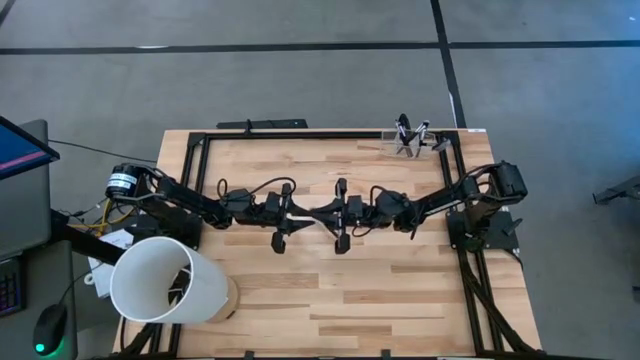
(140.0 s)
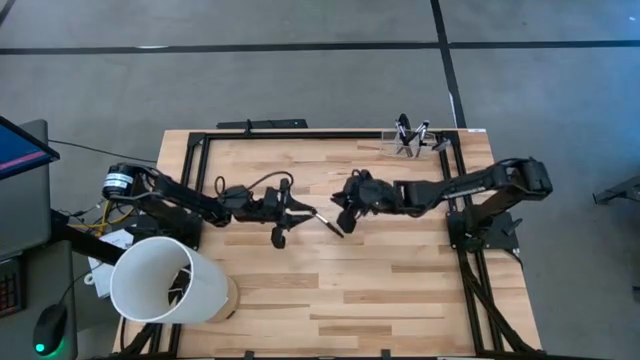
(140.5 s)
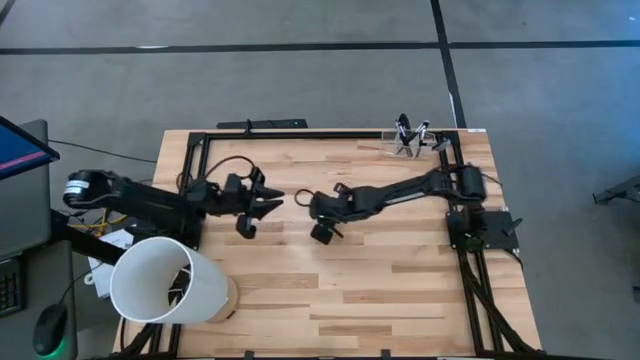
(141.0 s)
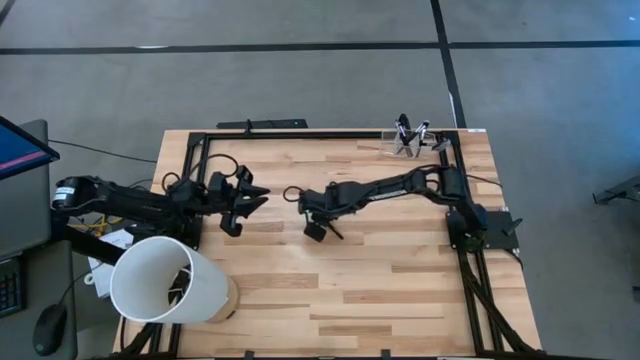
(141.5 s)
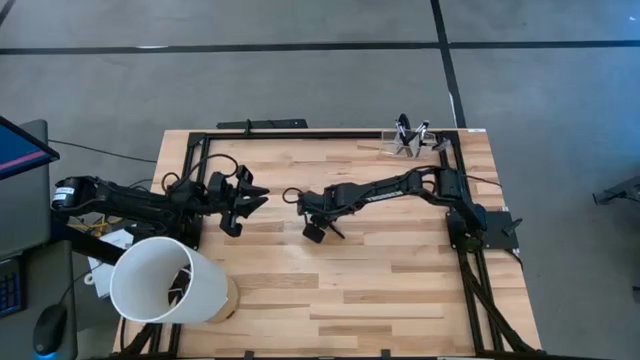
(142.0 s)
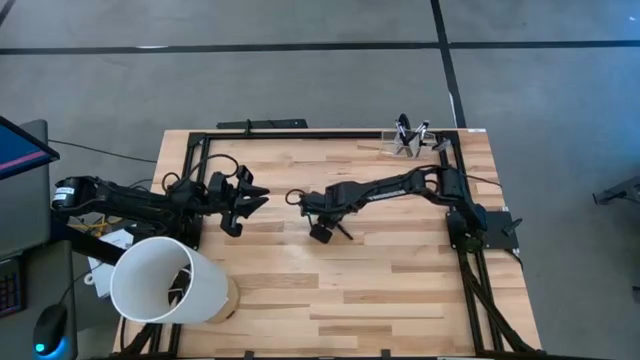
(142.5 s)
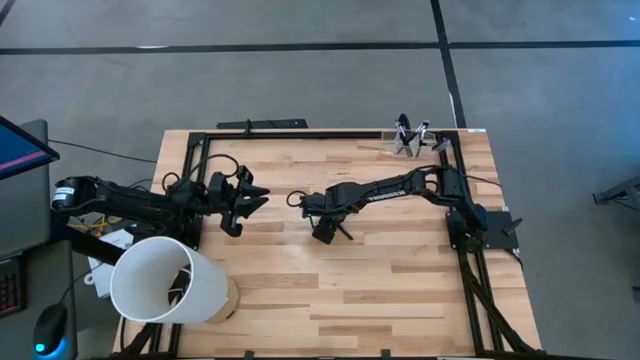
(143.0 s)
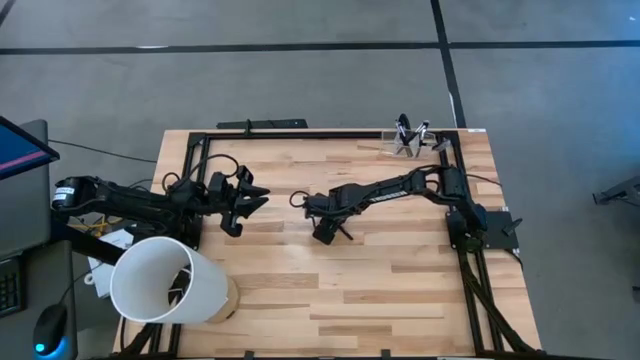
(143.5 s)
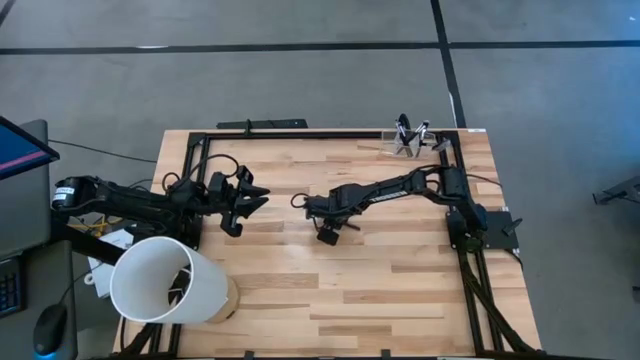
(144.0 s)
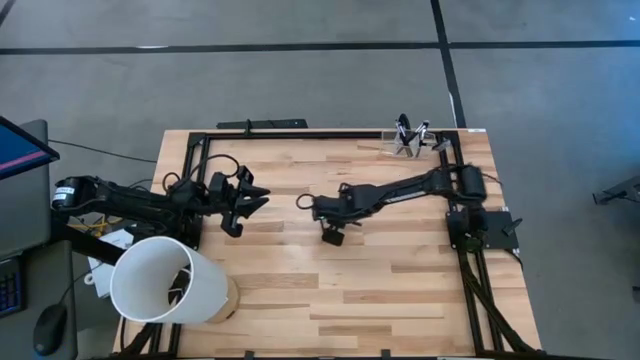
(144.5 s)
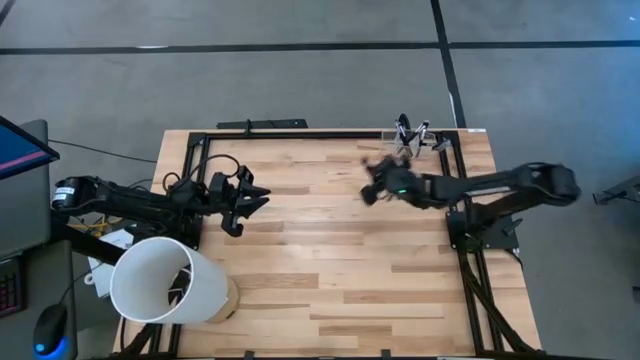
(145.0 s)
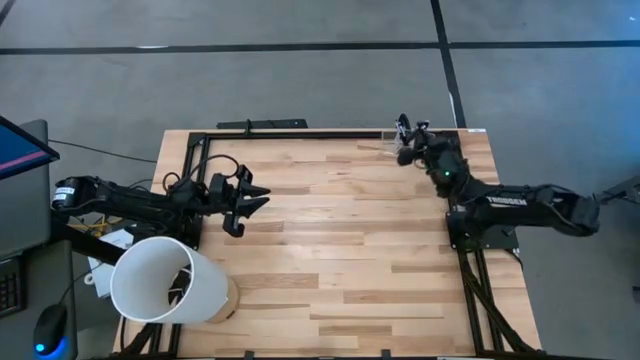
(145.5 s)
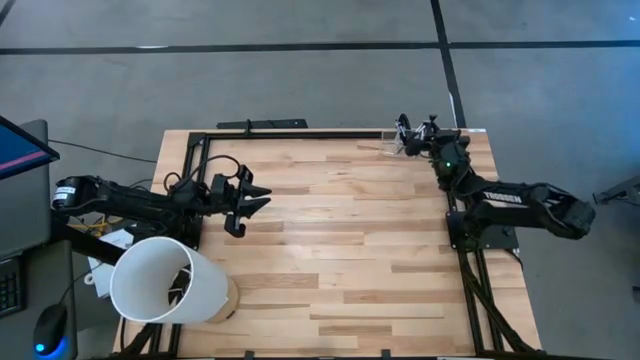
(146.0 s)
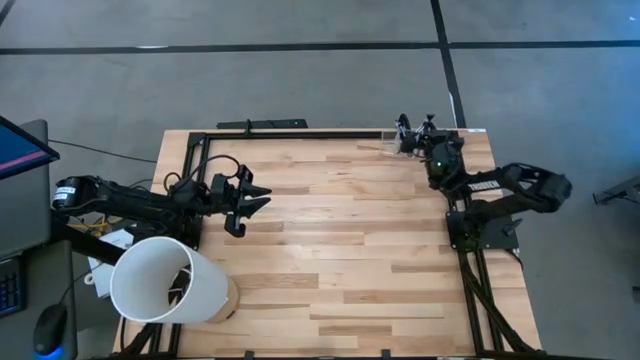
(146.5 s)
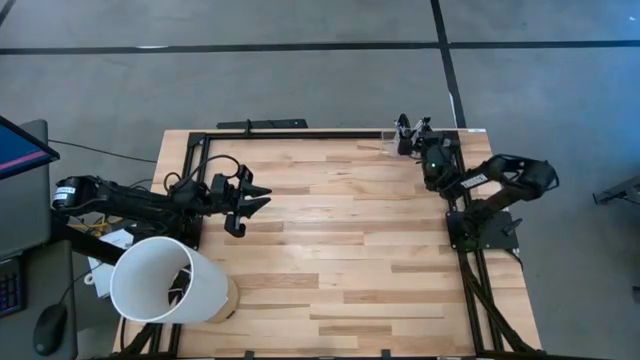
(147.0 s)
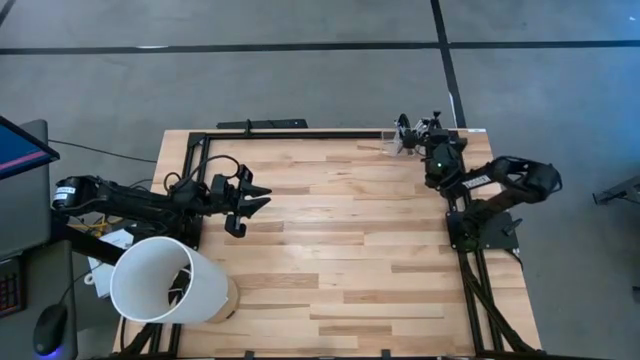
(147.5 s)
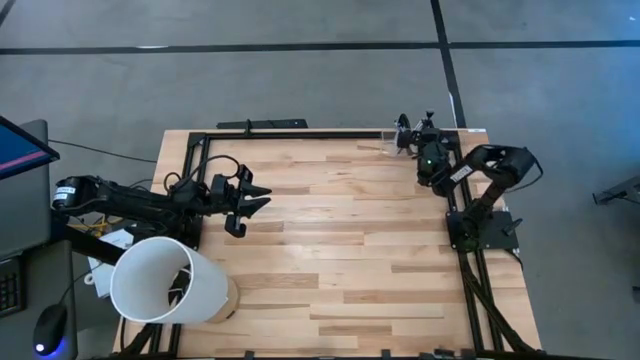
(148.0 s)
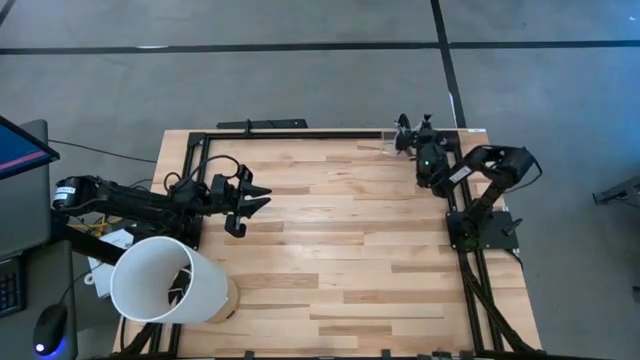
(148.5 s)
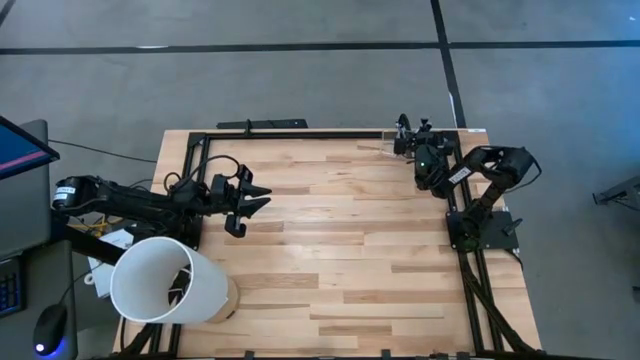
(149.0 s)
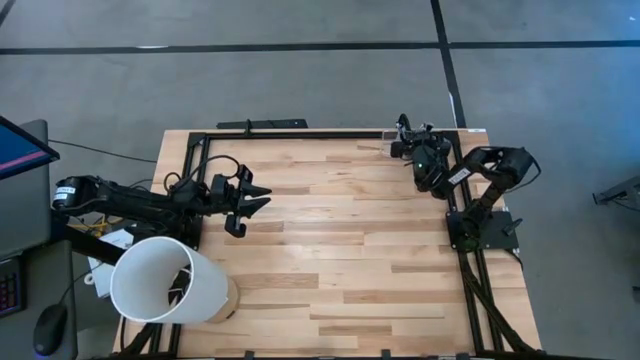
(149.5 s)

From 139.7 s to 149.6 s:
Task: Put items in baskets/containers
Put the powder brush into the right section of the transparent organizer

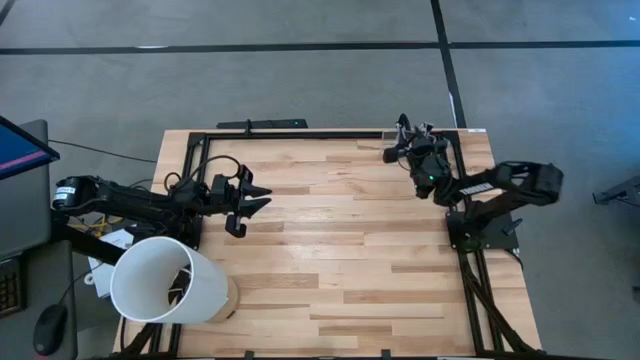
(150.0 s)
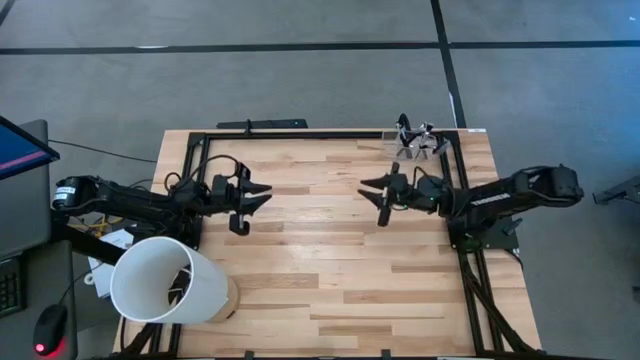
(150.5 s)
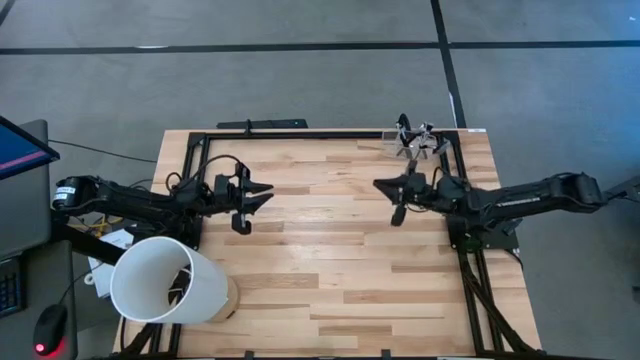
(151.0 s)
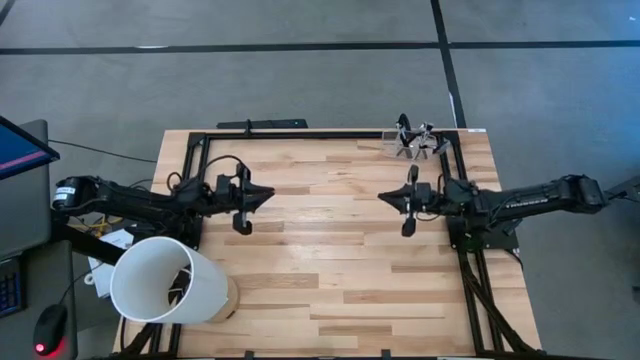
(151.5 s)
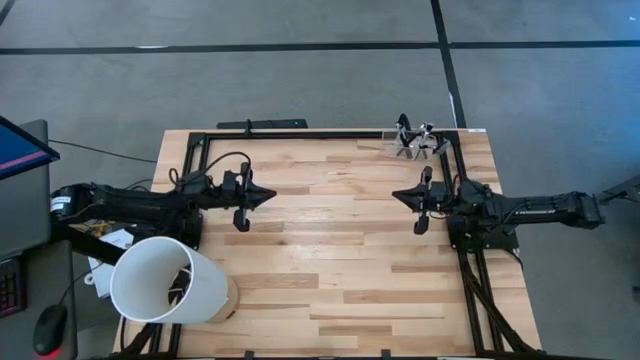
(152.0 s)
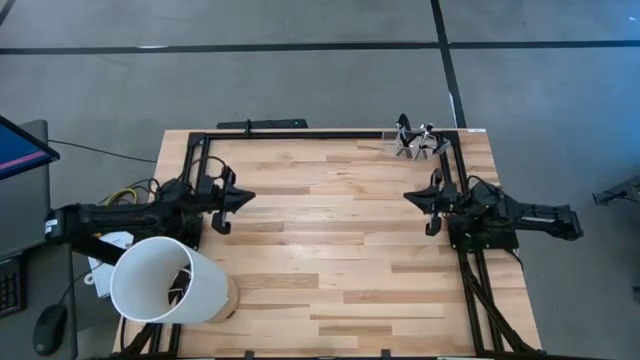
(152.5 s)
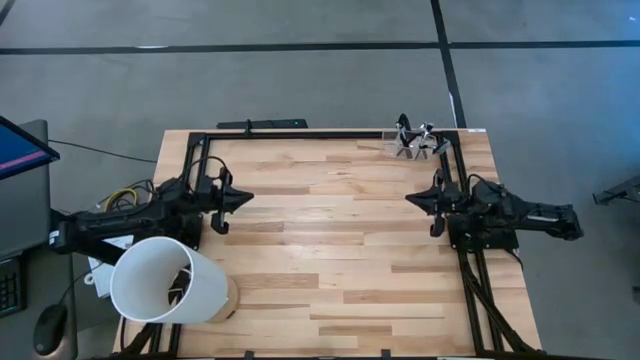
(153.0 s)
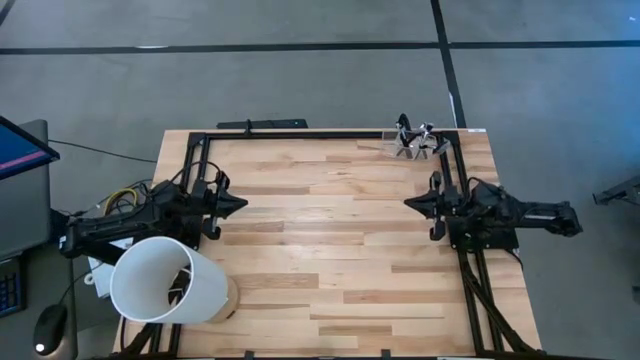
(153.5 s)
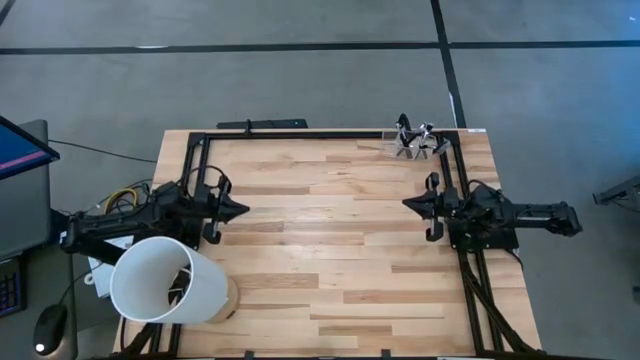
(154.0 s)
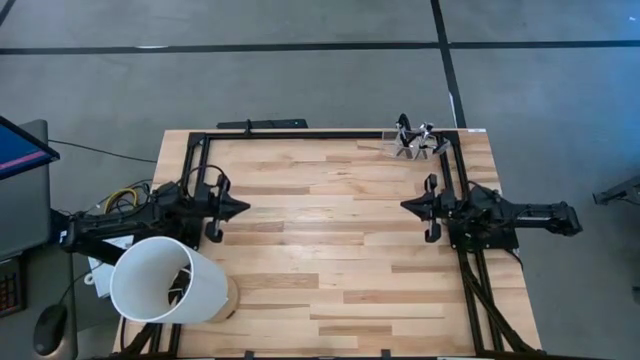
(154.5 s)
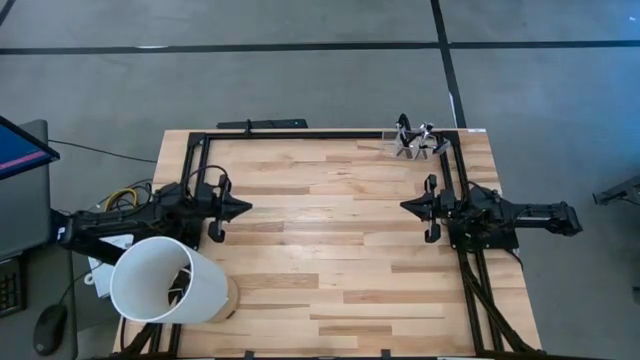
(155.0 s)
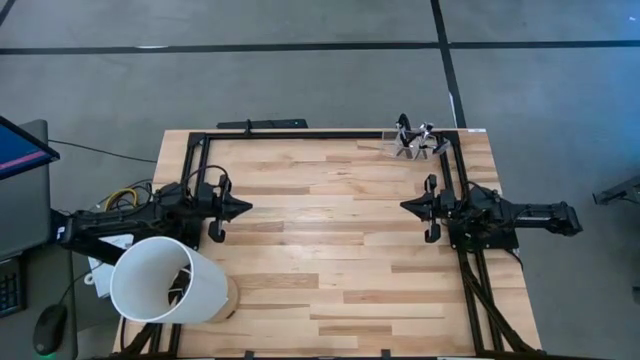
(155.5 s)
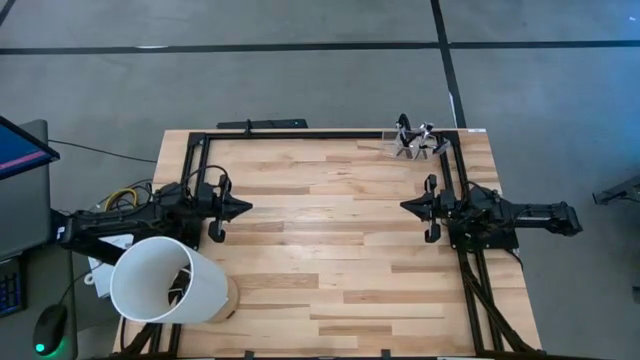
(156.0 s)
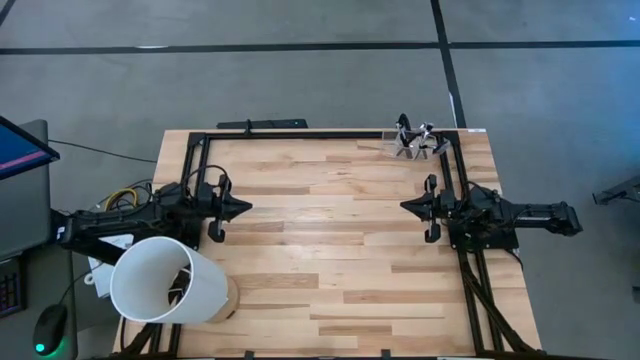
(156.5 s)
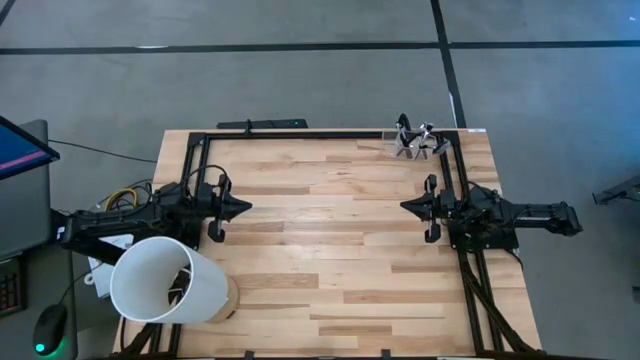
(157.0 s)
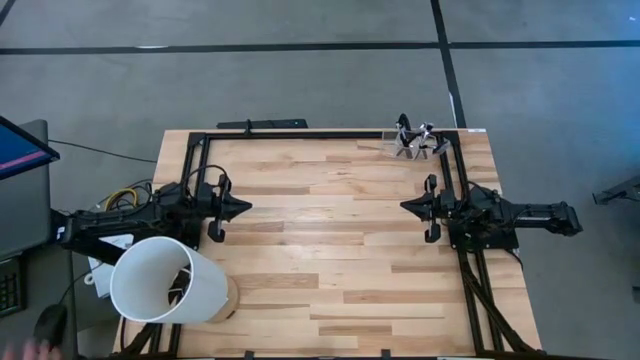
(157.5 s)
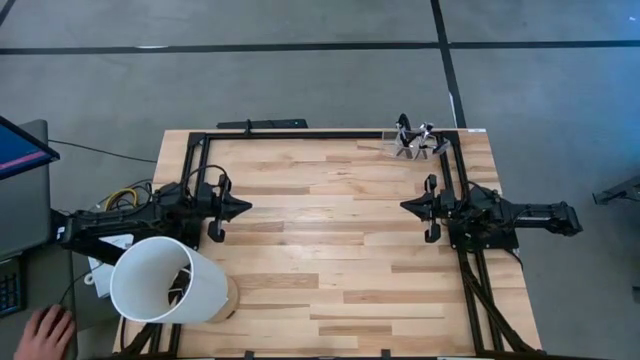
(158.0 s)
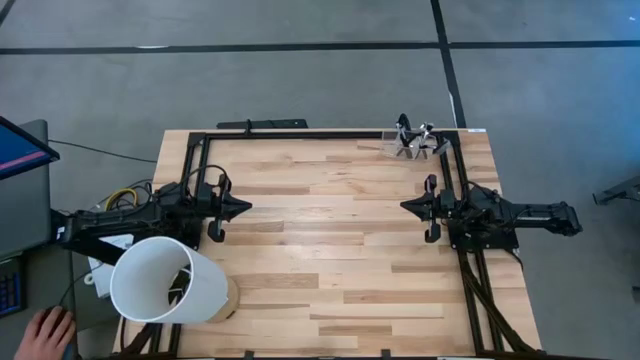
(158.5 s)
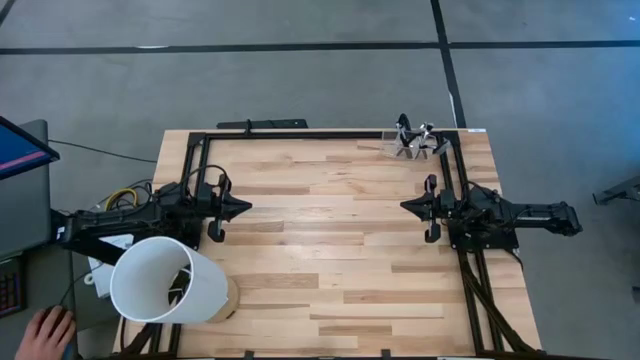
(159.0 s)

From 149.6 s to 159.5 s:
Return to Home Position
